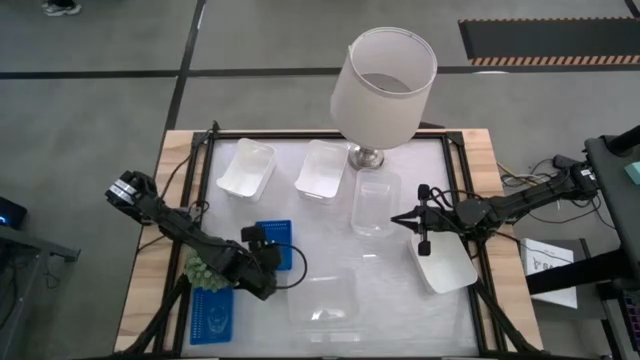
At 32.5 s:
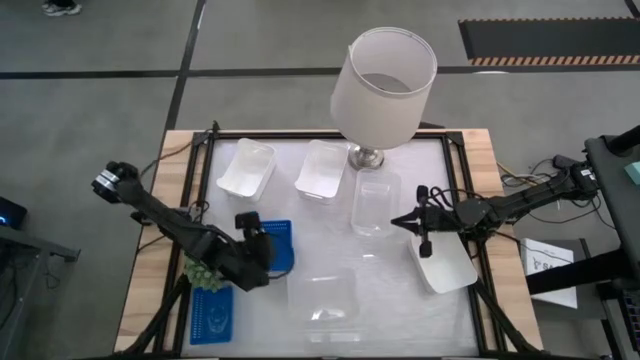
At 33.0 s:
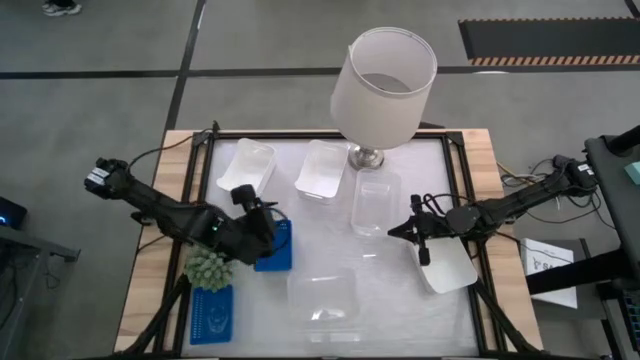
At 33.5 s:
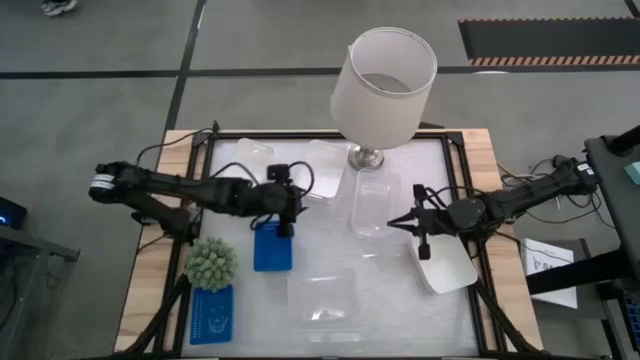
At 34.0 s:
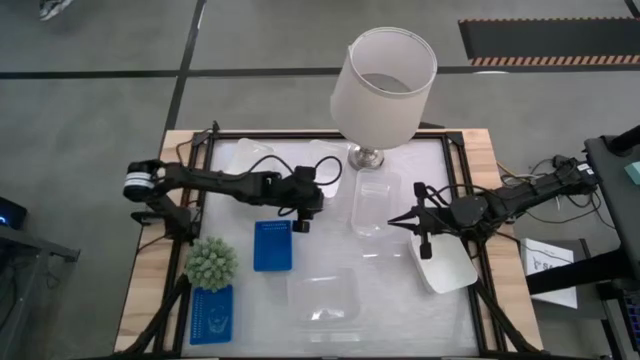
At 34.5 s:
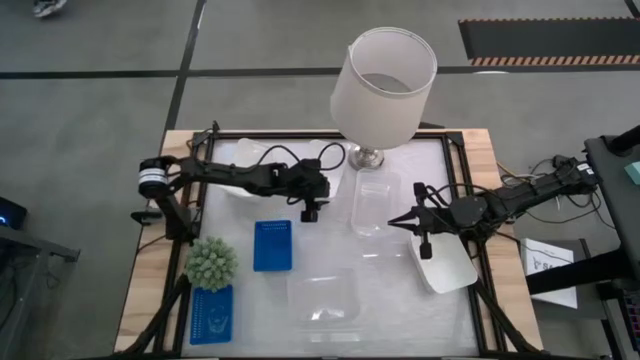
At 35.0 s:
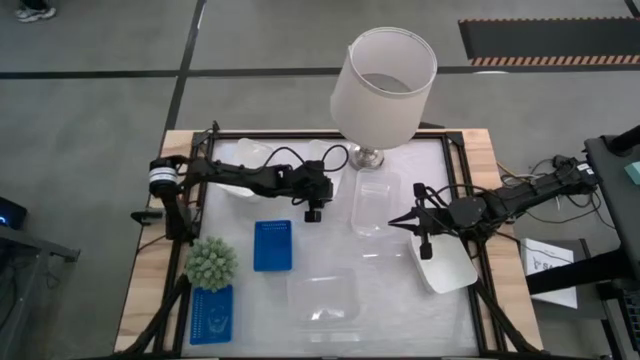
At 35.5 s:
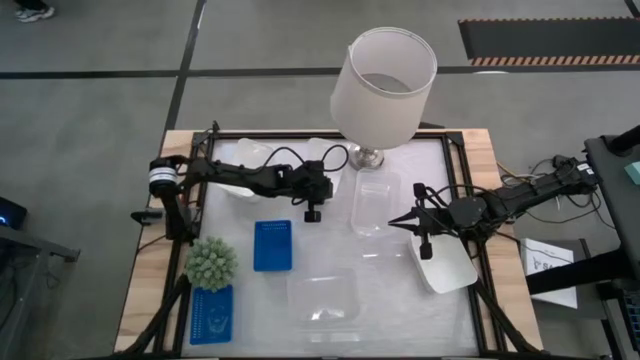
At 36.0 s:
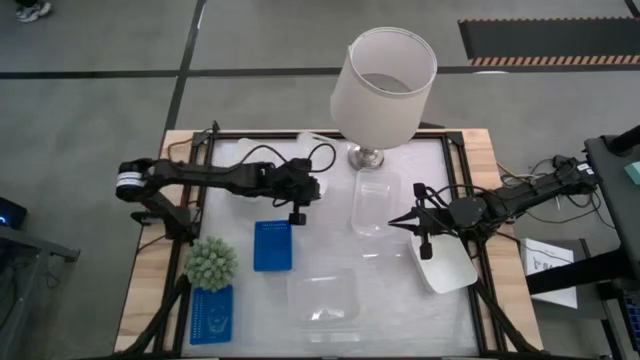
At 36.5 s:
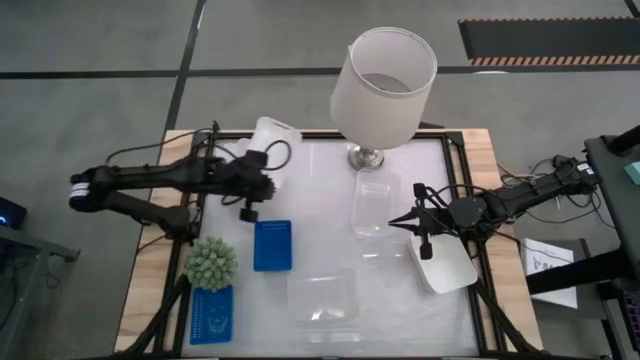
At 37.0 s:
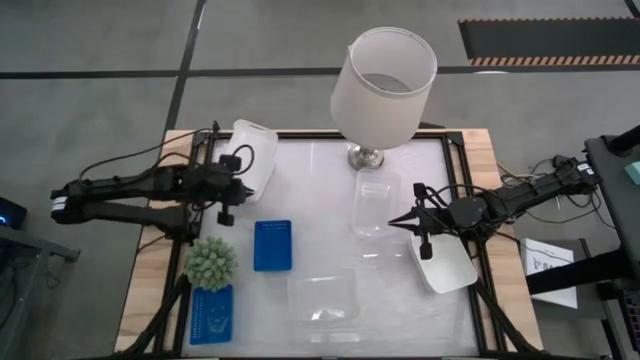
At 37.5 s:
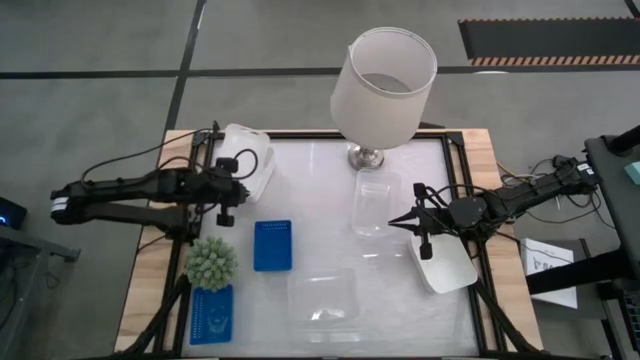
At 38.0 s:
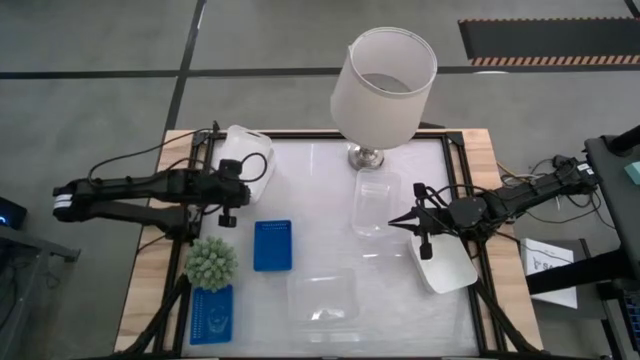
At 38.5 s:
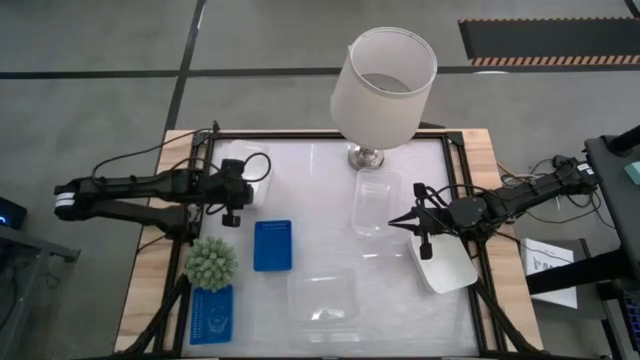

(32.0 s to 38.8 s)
Stack the middle white bin on the left white bin

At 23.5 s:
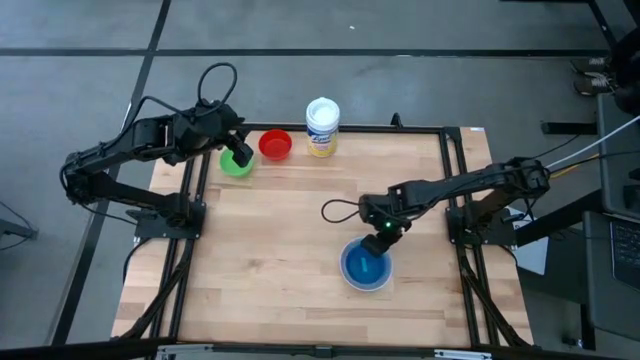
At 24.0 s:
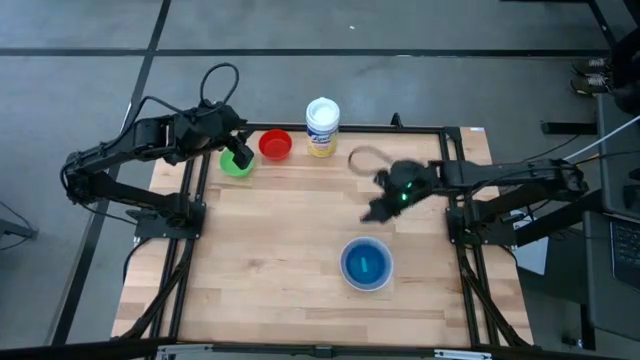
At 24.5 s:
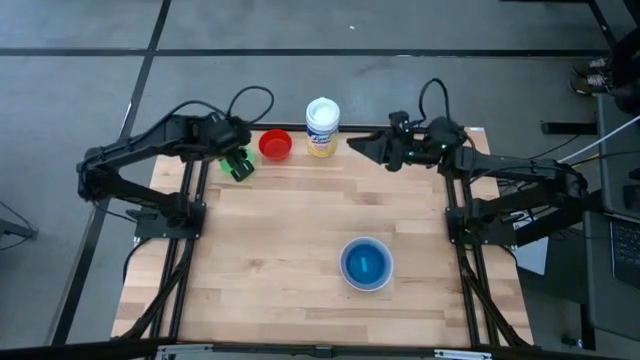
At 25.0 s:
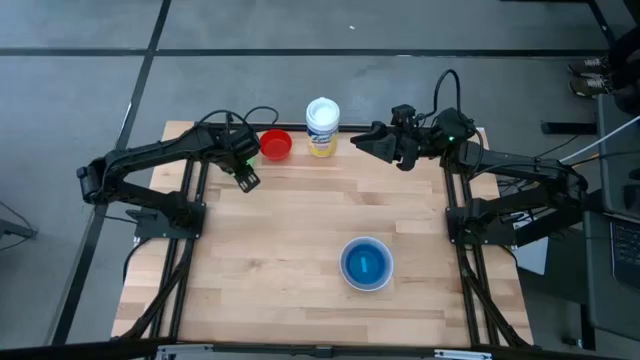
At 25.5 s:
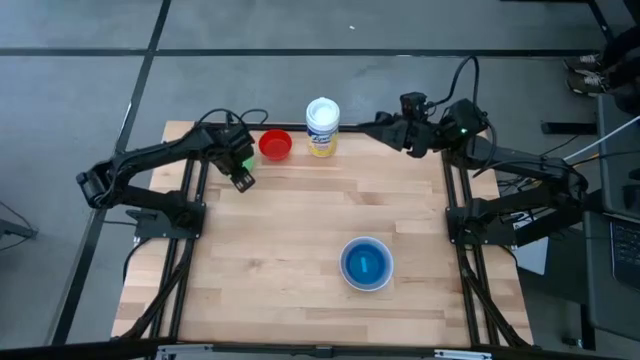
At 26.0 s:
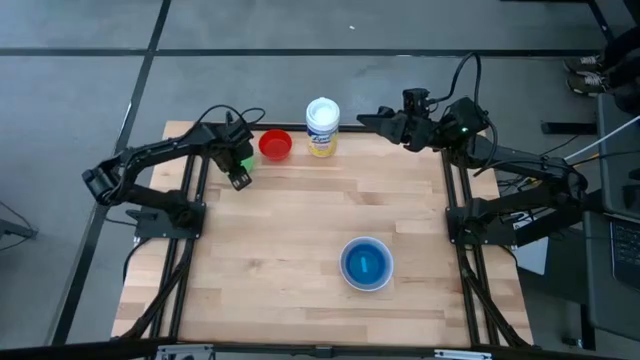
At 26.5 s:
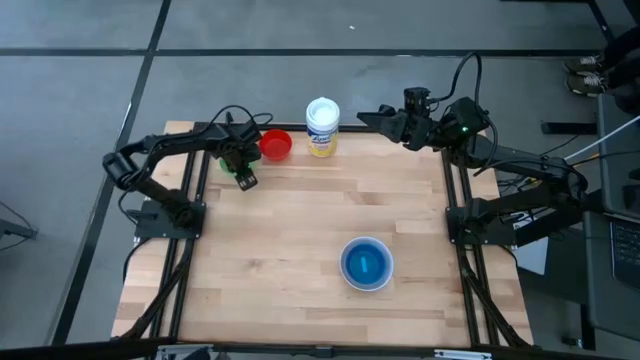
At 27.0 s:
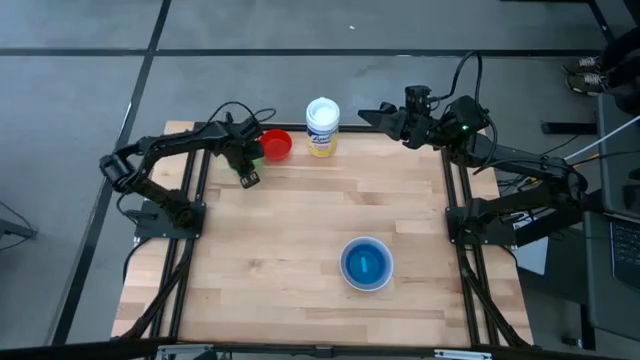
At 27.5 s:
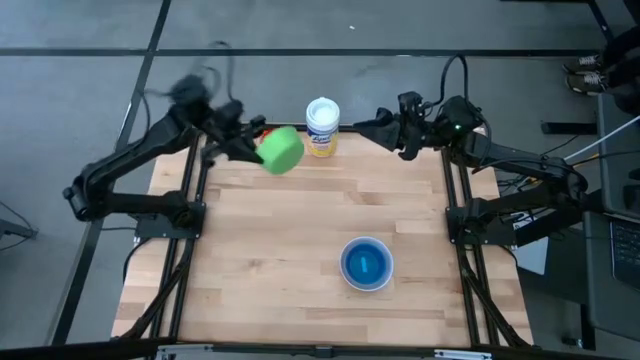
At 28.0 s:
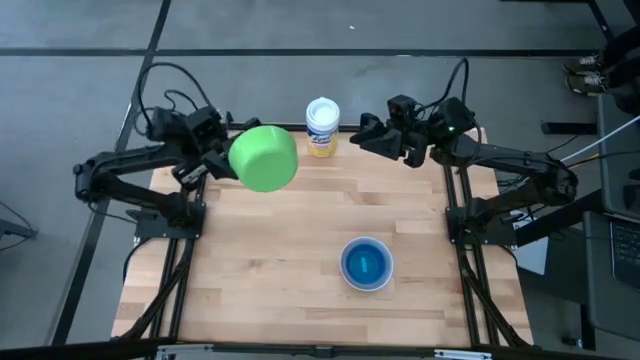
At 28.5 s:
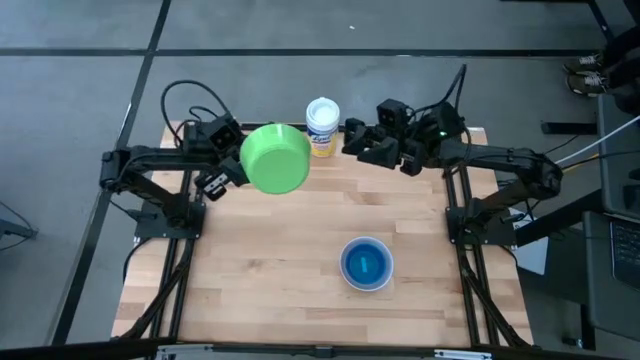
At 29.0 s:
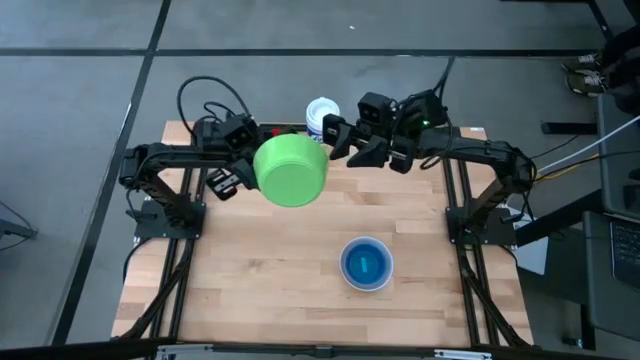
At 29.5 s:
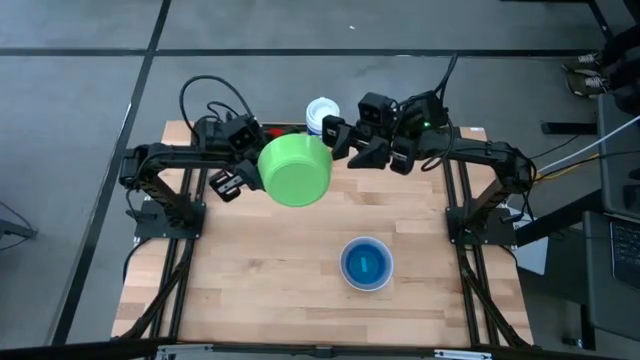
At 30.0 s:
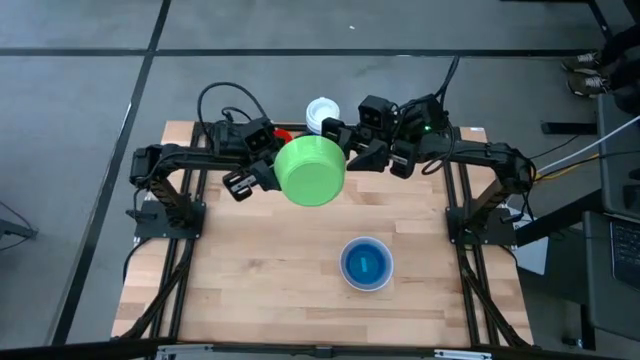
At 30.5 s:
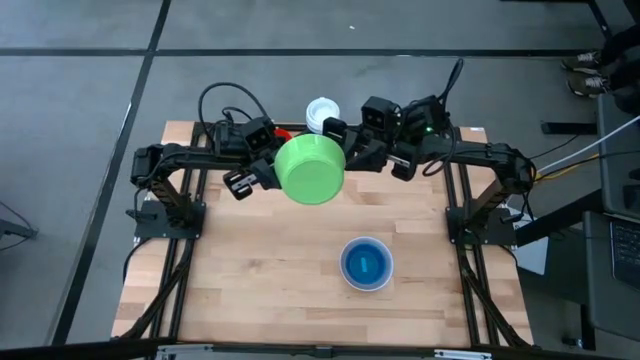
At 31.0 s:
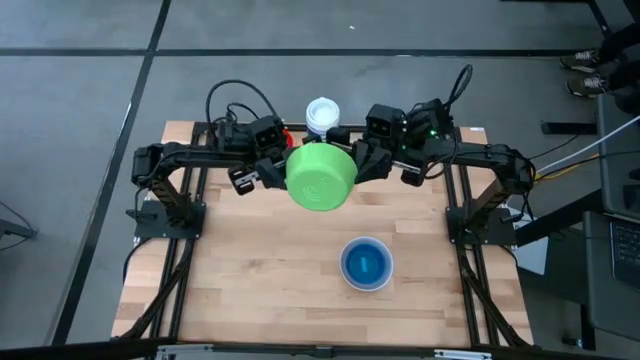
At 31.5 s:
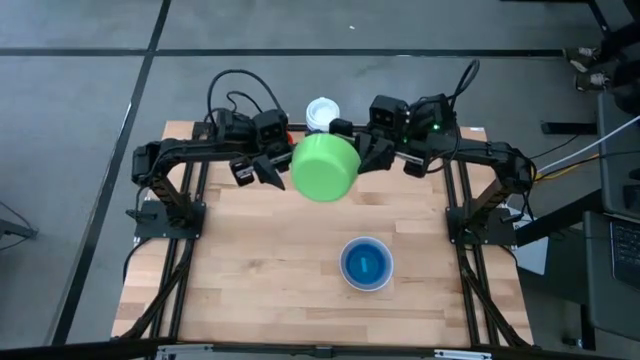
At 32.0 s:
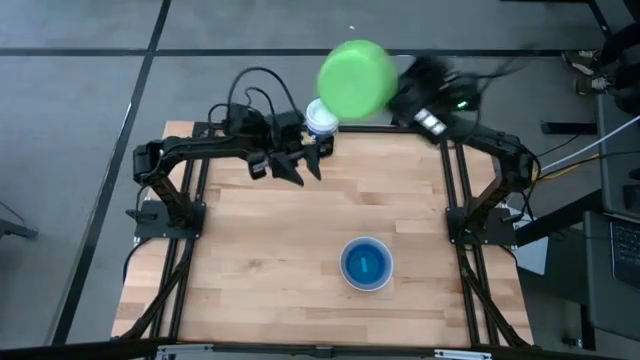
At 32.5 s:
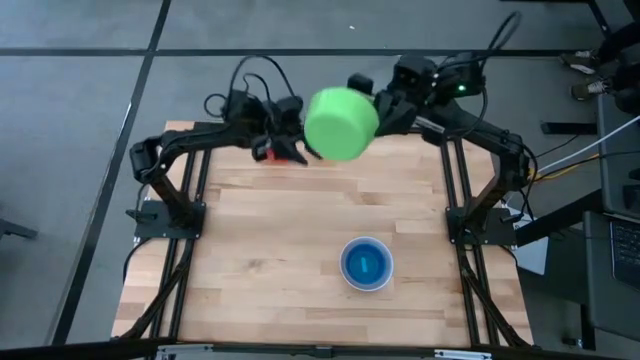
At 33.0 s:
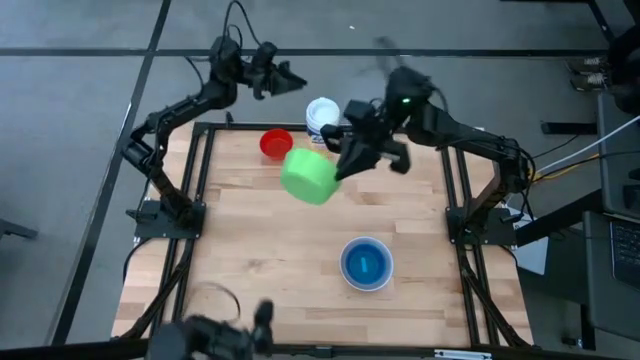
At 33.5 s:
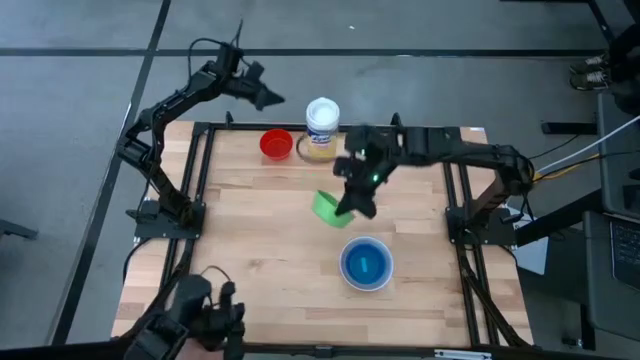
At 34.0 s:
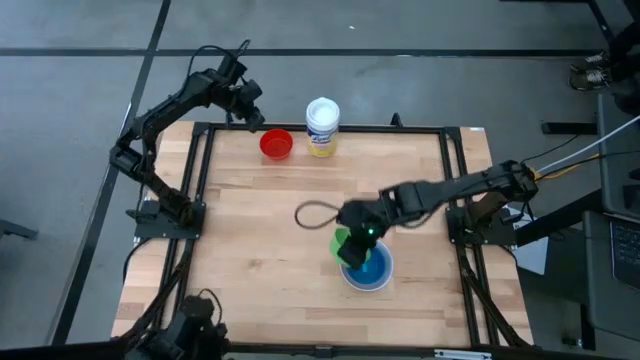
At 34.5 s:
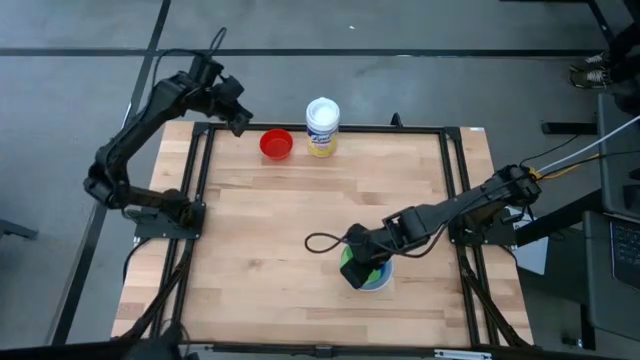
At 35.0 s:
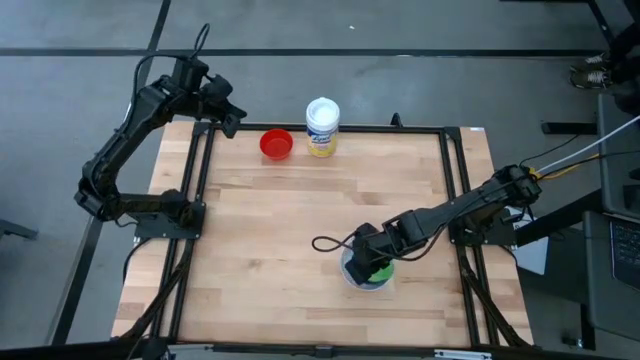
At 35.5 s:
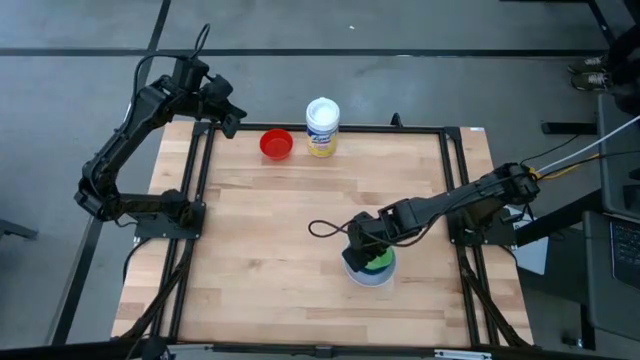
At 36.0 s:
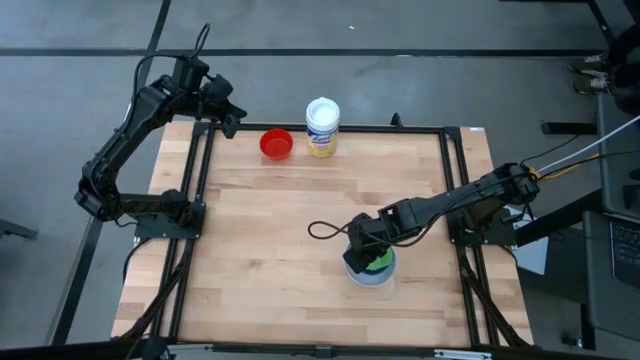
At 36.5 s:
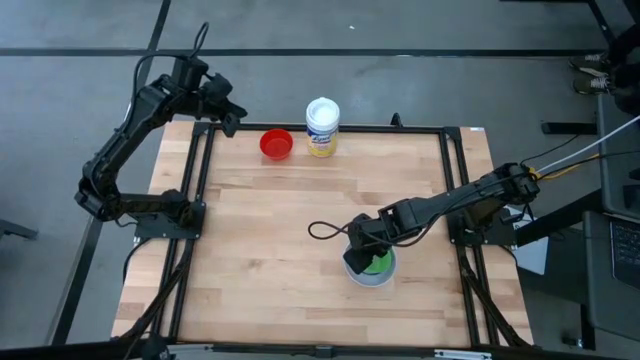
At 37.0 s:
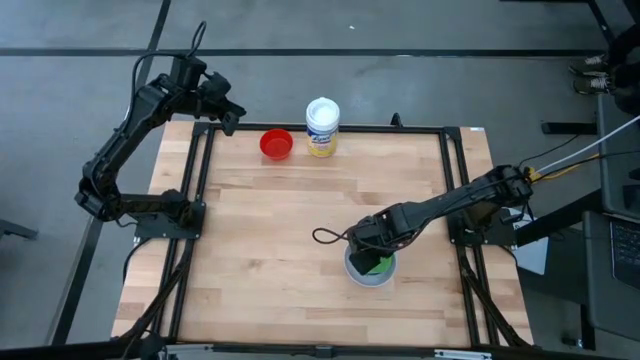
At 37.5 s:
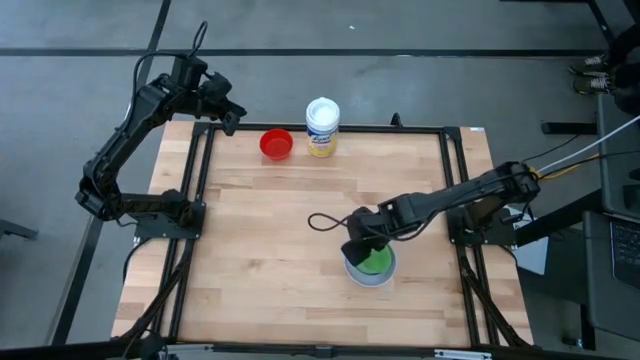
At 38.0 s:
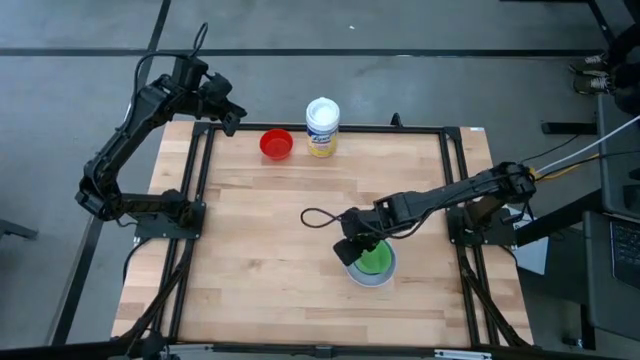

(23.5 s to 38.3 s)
Stack the green bowl on top of the stacked bowls
